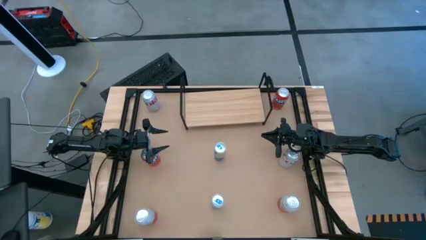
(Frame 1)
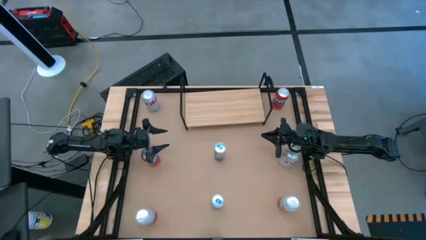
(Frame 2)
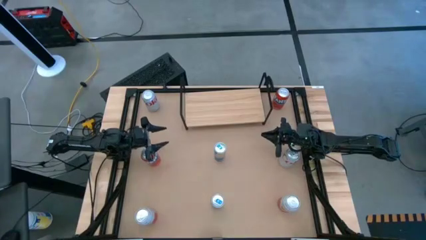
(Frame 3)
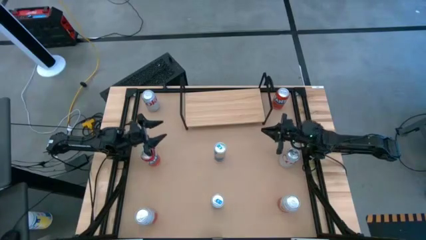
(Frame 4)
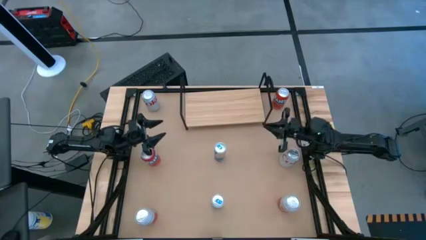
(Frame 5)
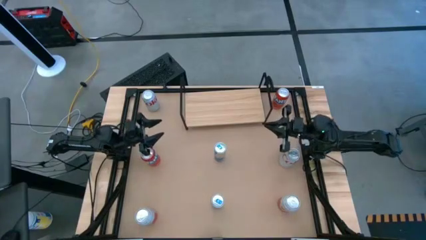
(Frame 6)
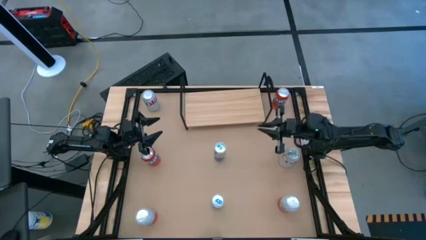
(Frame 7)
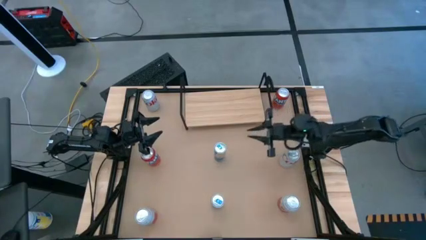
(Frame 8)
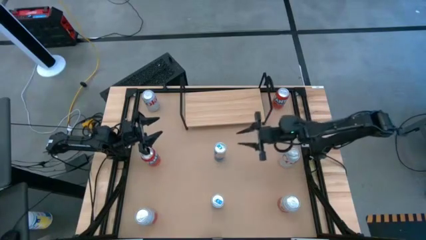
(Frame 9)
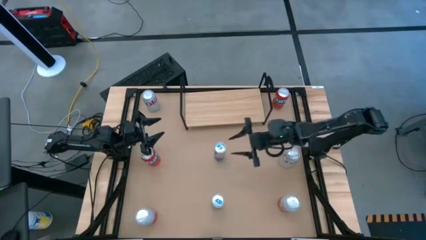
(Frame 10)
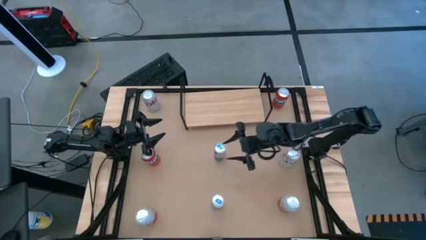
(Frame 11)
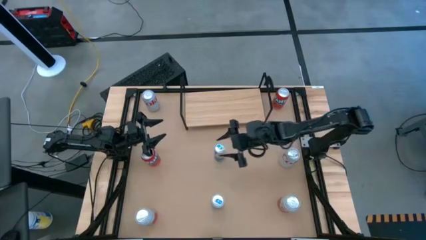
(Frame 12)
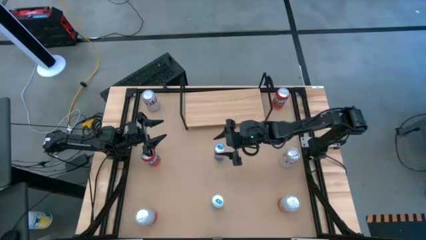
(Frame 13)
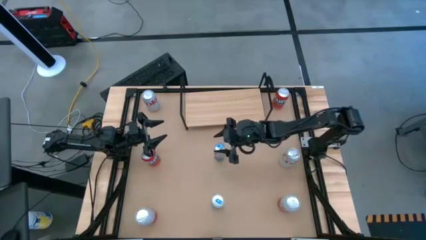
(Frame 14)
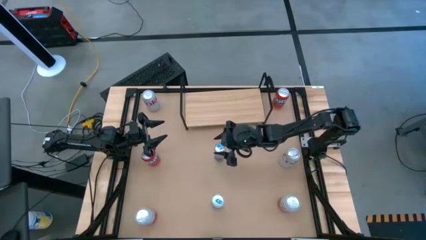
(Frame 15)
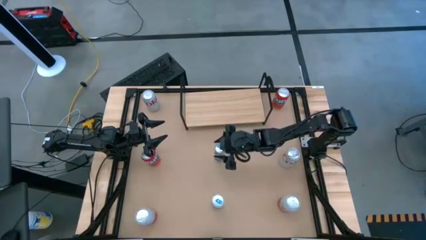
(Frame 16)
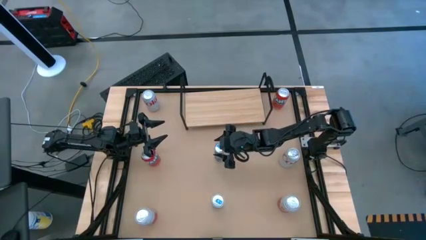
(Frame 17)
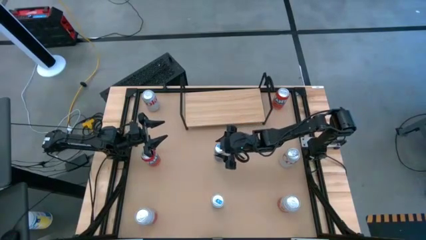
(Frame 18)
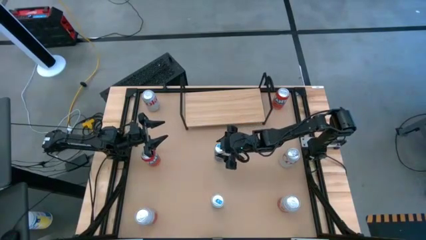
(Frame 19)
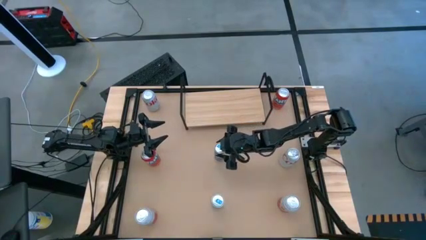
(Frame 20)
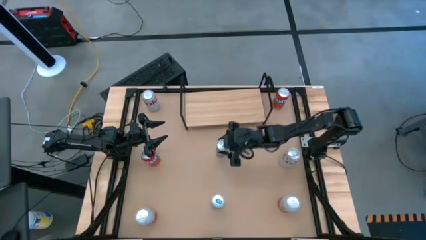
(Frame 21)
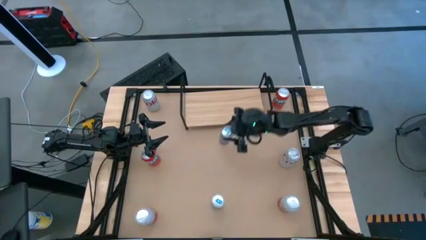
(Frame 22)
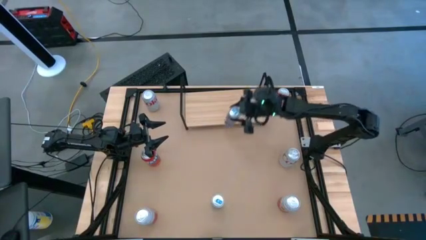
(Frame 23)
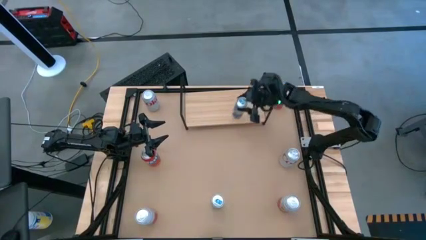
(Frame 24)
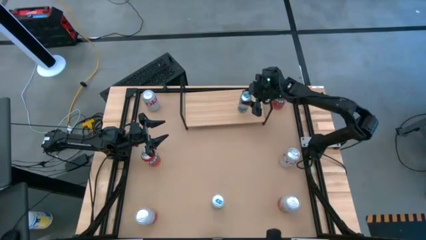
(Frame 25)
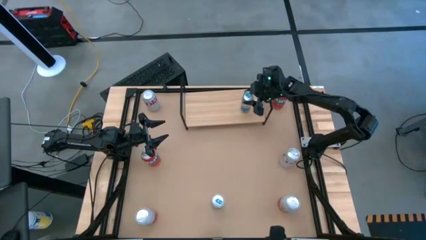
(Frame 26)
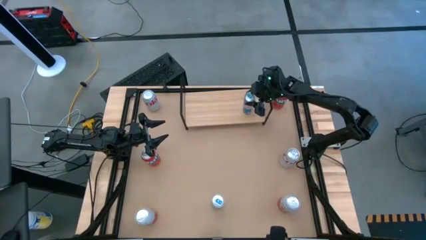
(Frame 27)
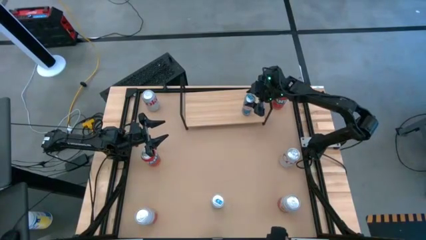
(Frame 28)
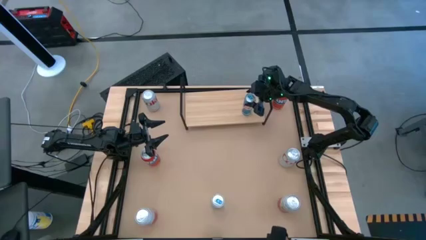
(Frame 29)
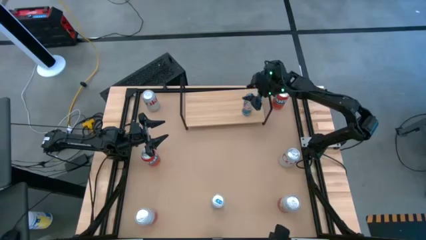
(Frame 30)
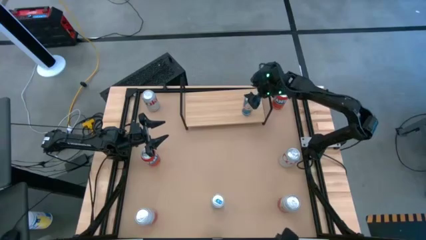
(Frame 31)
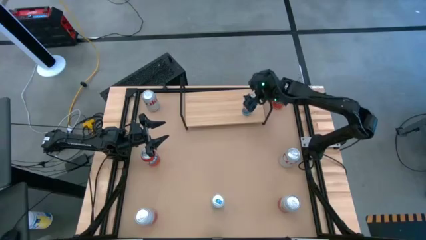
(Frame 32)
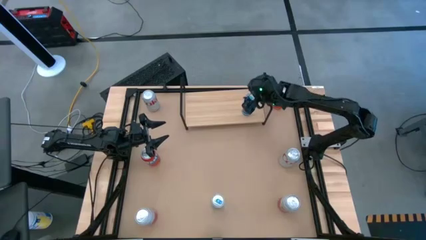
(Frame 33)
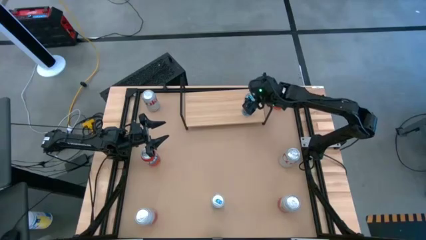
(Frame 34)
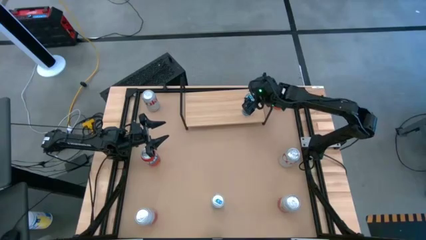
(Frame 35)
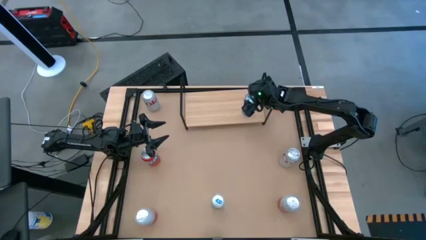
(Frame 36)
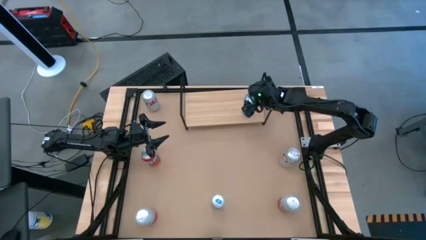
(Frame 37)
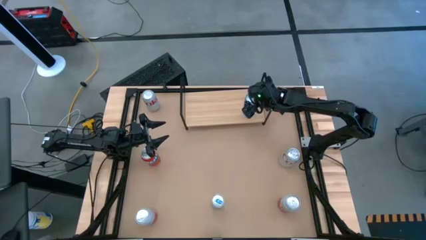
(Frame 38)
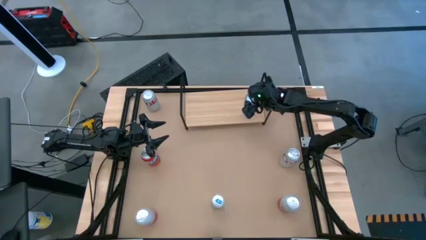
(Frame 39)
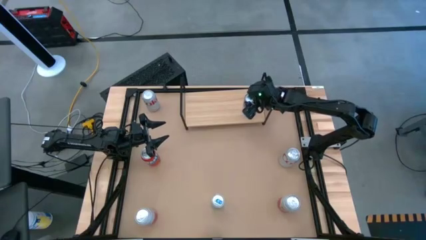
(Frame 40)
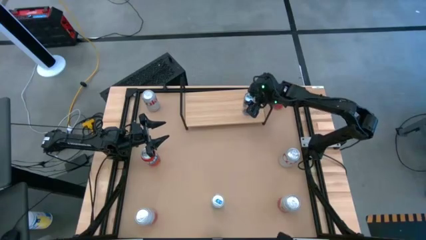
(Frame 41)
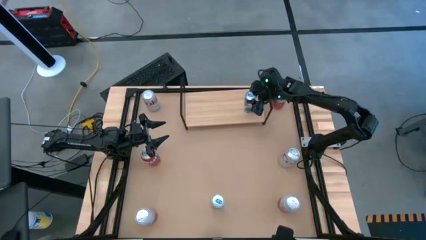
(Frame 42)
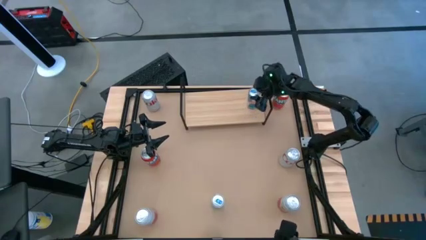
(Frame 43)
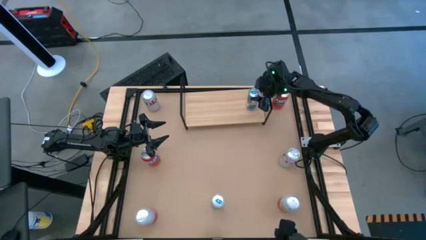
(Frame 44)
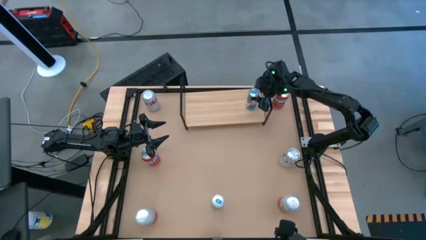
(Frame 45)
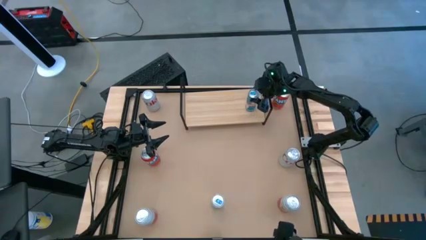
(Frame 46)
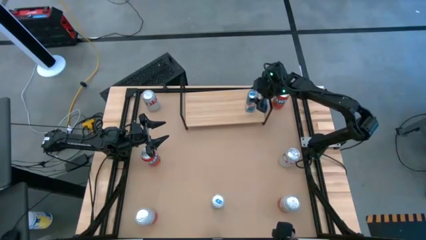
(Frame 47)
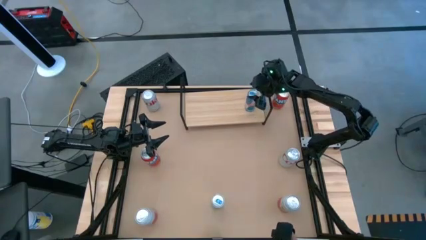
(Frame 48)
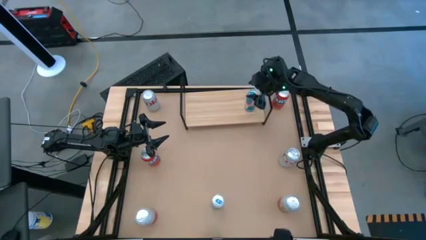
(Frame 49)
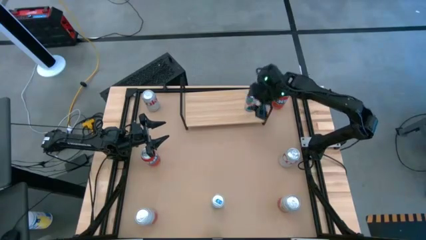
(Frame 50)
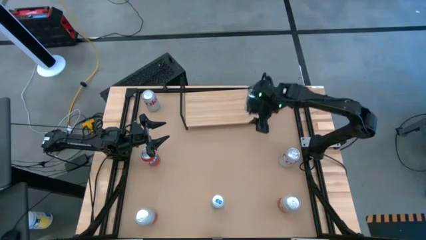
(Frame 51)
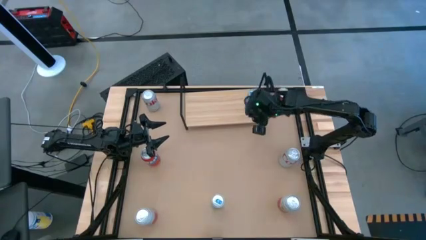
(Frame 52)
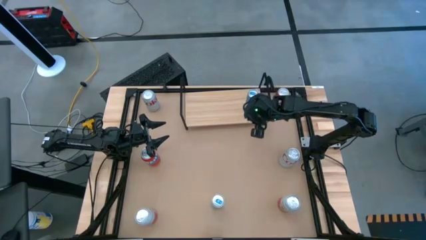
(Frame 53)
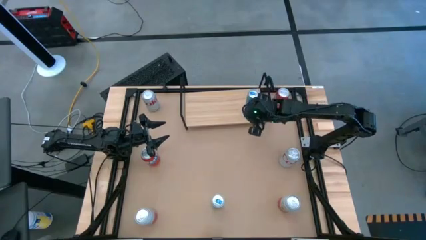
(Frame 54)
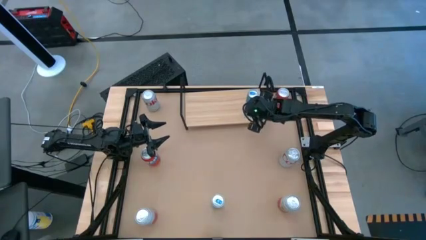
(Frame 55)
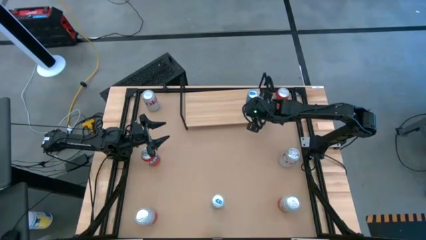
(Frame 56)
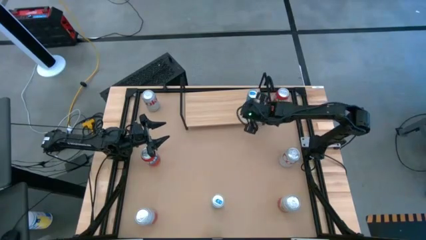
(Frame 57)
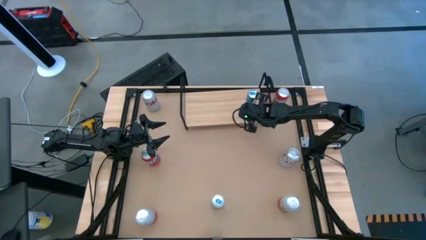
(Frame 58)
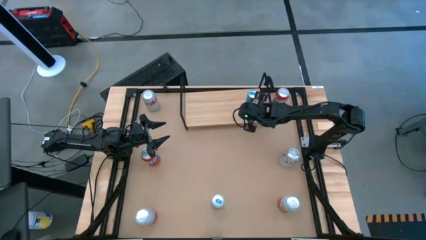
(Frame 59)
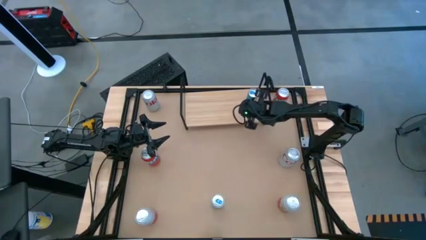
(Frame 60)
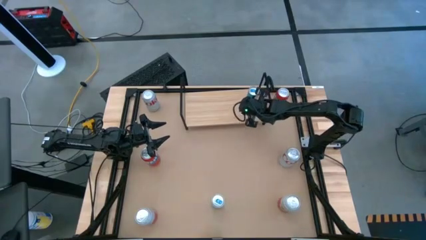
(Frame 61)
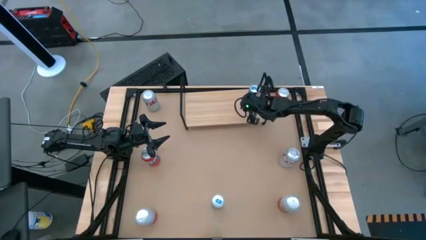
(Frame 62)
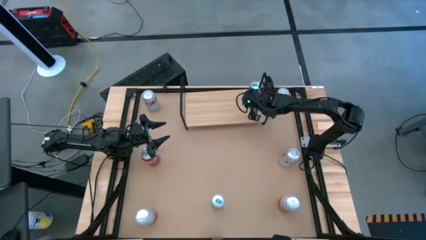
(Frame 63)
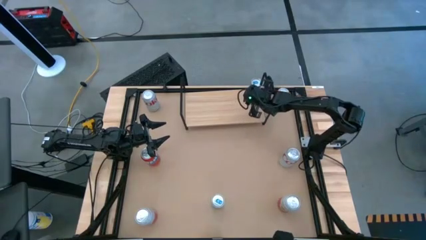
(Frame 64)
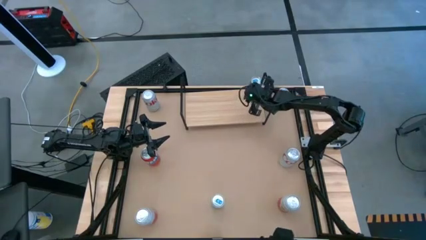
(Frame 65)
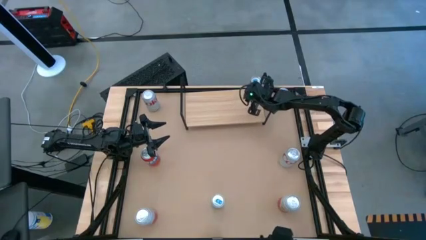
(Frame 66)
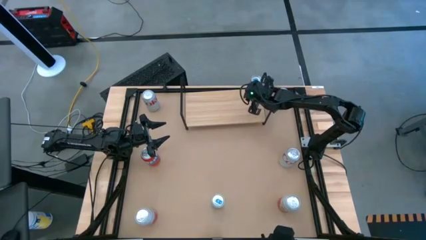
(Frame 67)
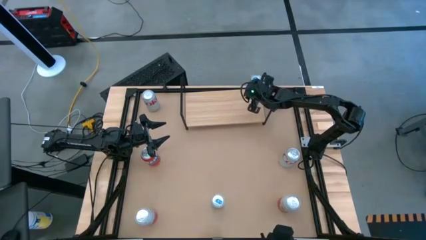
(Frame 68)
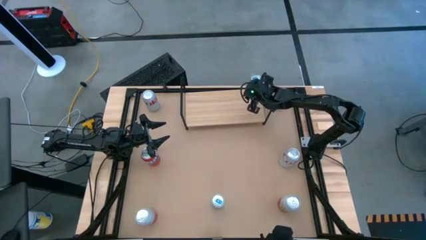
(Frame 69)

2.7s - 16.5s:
Task: Place canned beverage on shelf
Put the top blue soda can on the shelf
